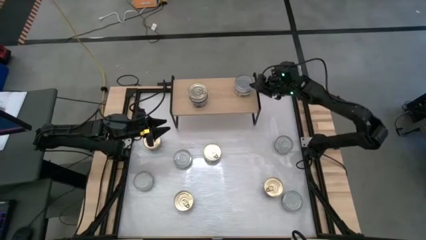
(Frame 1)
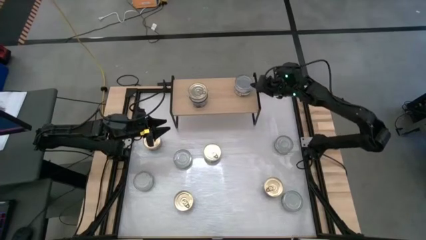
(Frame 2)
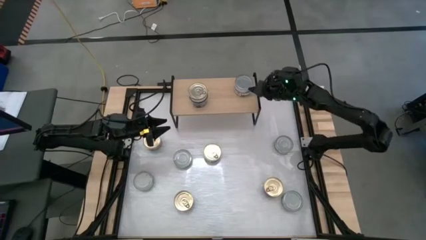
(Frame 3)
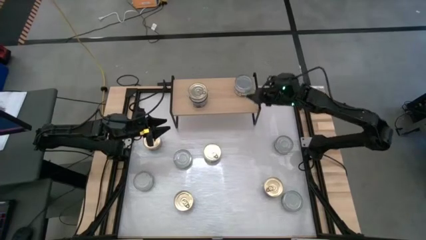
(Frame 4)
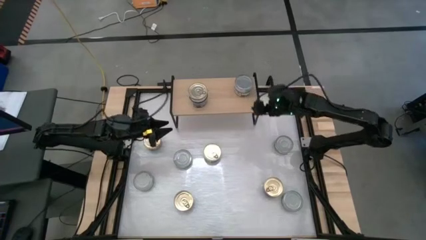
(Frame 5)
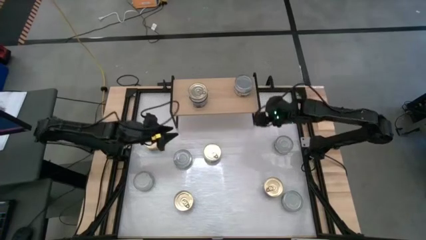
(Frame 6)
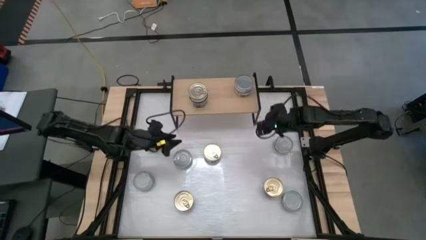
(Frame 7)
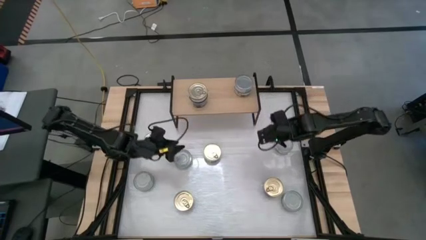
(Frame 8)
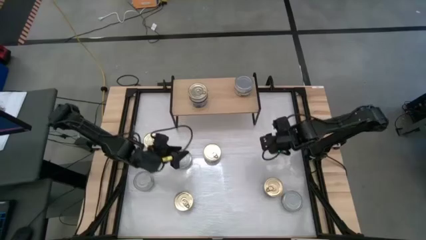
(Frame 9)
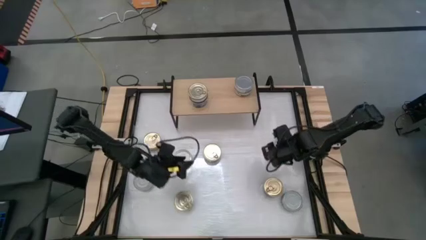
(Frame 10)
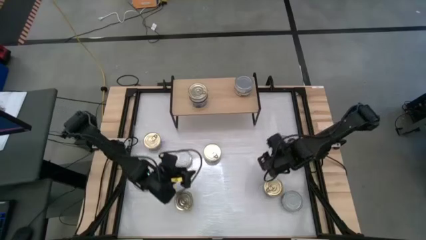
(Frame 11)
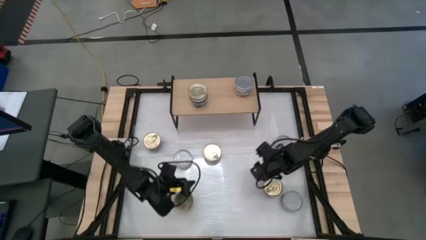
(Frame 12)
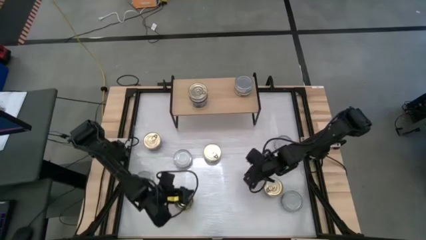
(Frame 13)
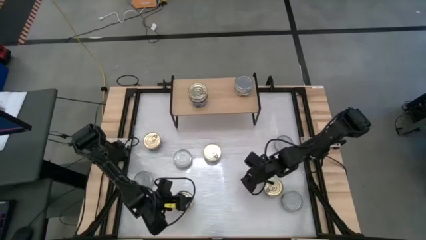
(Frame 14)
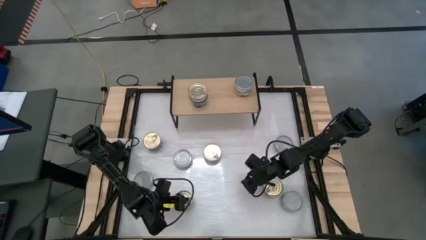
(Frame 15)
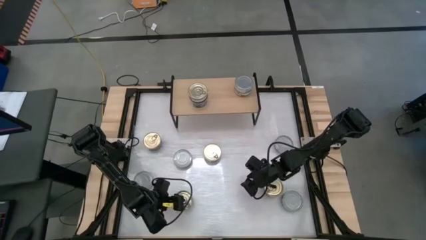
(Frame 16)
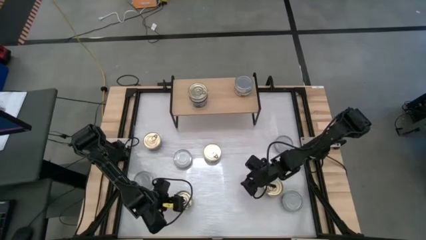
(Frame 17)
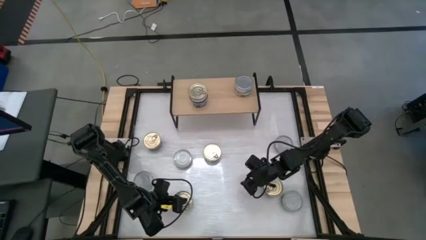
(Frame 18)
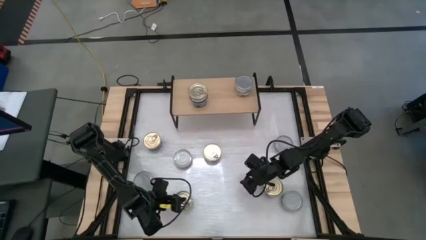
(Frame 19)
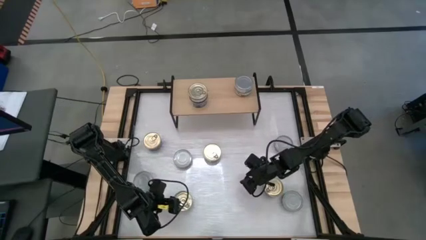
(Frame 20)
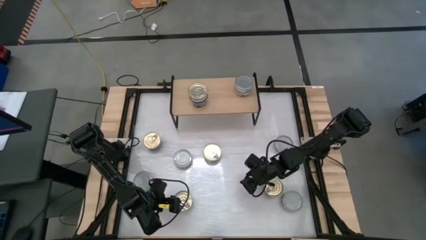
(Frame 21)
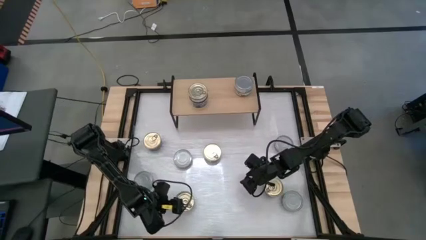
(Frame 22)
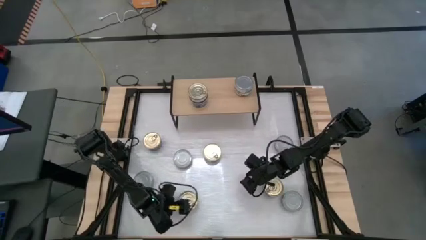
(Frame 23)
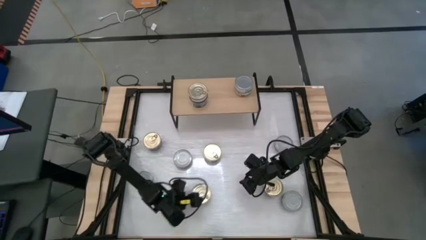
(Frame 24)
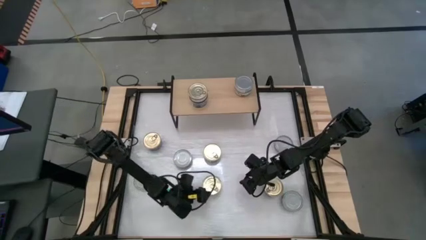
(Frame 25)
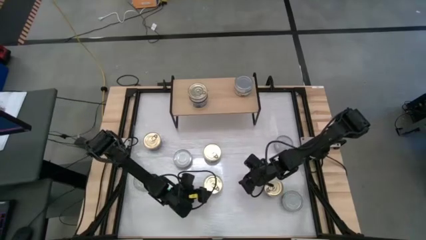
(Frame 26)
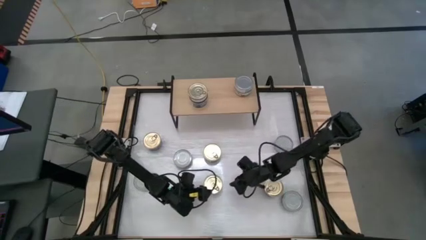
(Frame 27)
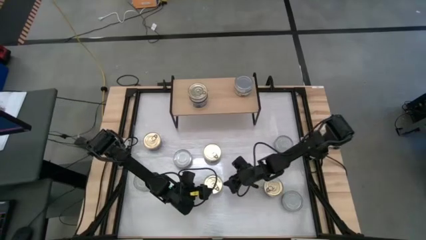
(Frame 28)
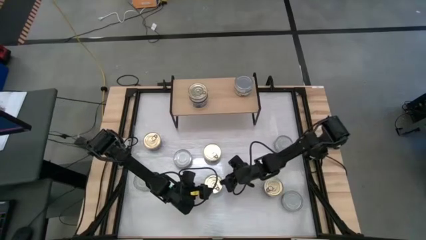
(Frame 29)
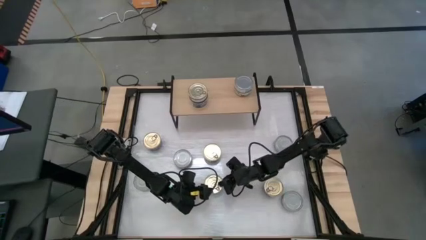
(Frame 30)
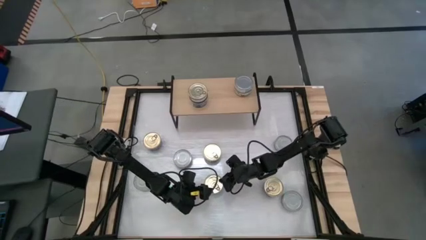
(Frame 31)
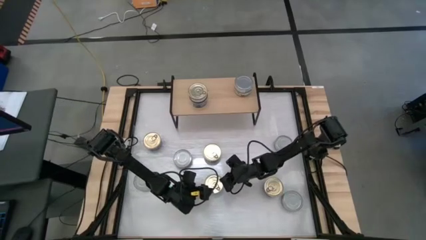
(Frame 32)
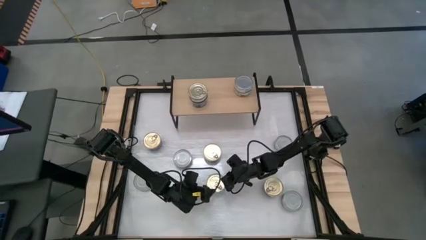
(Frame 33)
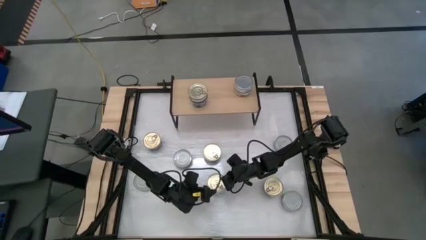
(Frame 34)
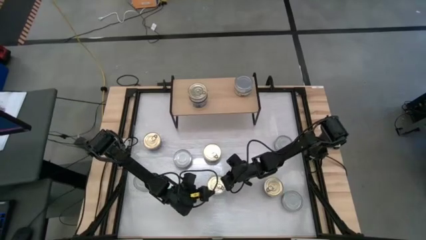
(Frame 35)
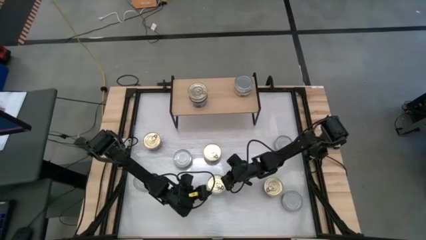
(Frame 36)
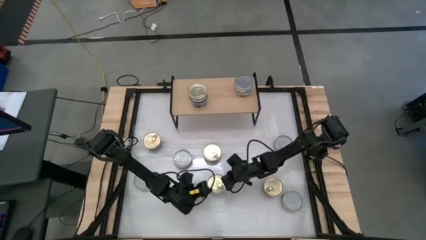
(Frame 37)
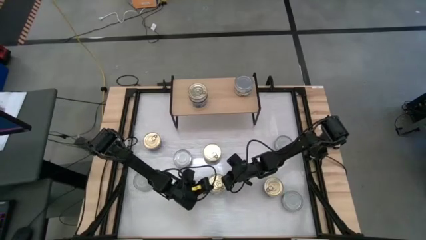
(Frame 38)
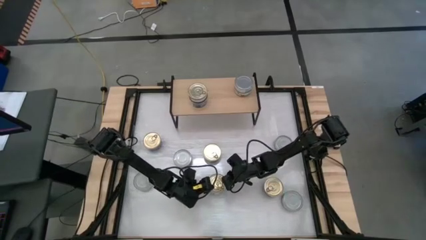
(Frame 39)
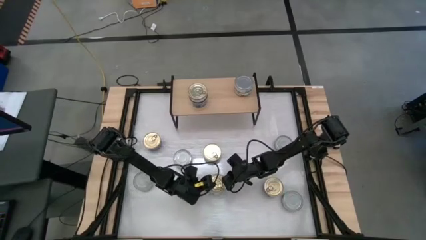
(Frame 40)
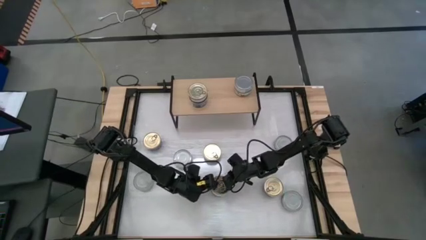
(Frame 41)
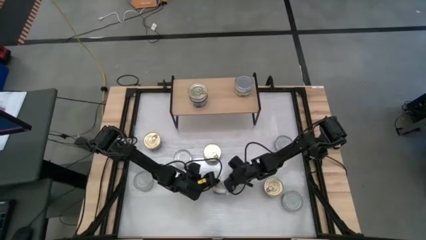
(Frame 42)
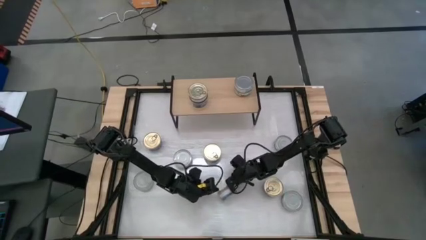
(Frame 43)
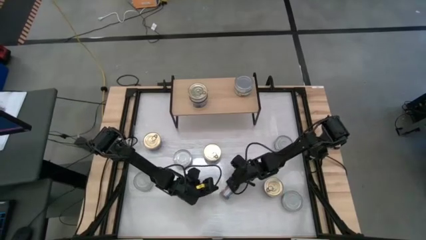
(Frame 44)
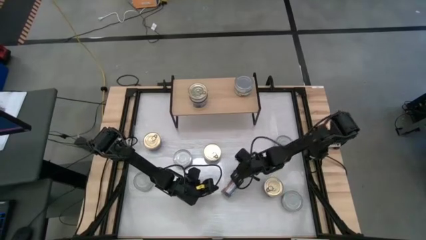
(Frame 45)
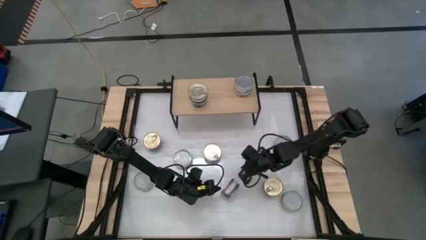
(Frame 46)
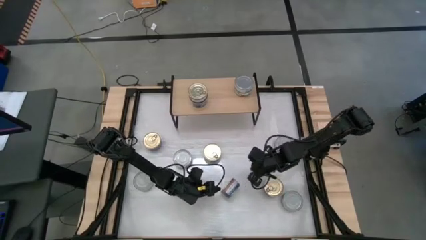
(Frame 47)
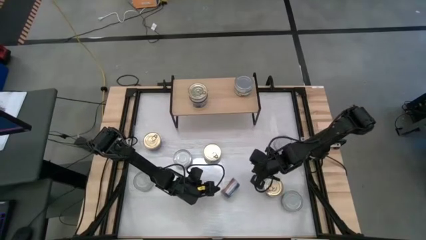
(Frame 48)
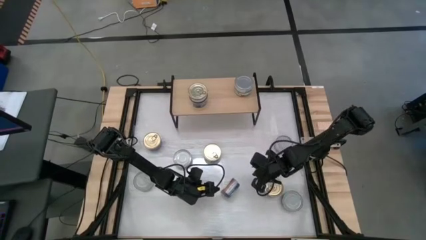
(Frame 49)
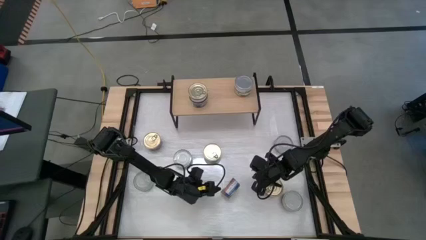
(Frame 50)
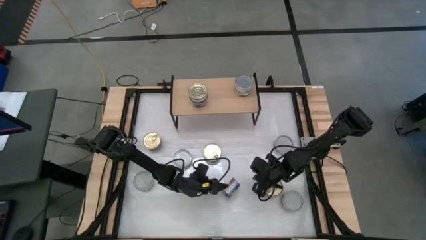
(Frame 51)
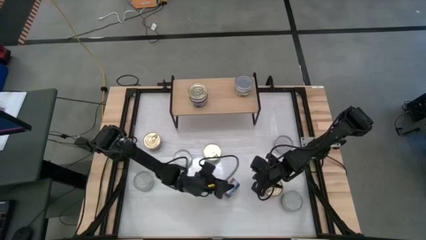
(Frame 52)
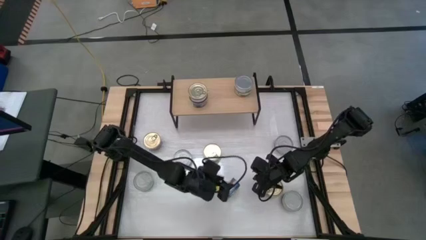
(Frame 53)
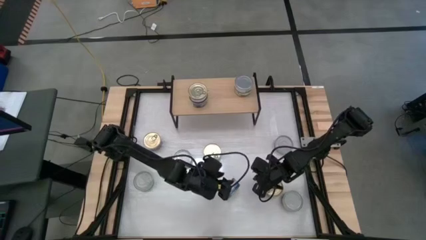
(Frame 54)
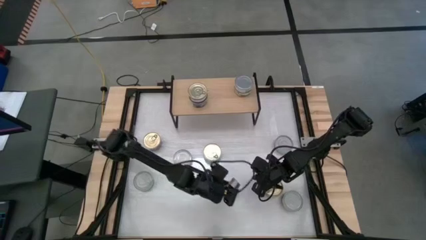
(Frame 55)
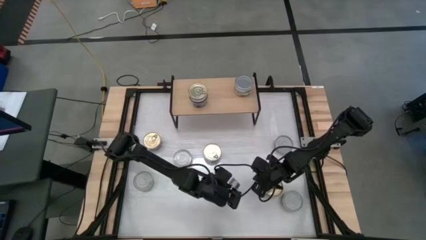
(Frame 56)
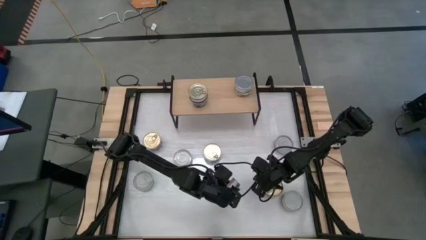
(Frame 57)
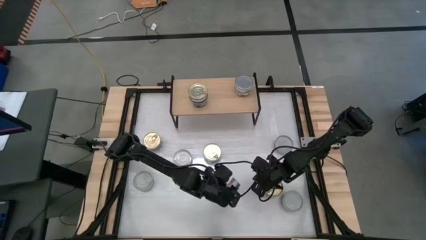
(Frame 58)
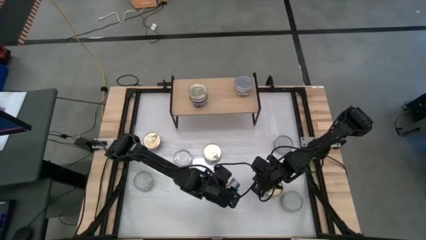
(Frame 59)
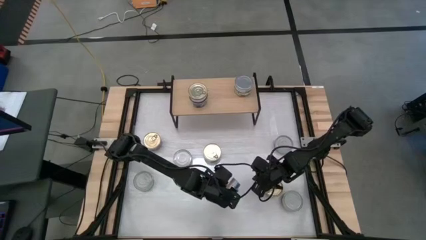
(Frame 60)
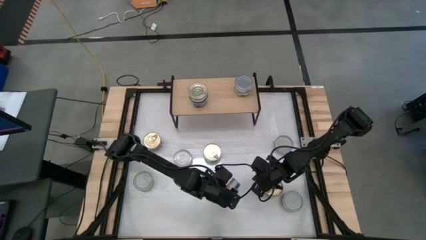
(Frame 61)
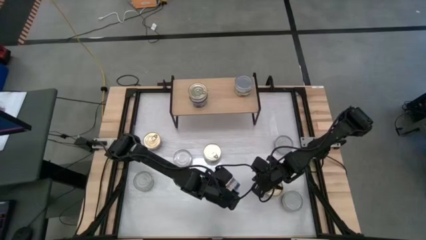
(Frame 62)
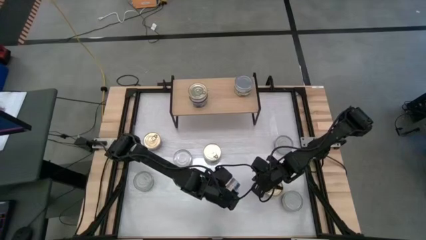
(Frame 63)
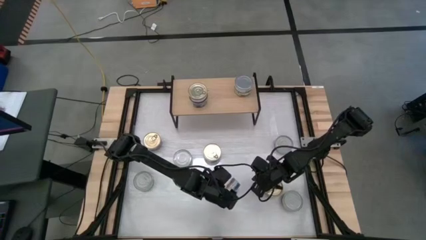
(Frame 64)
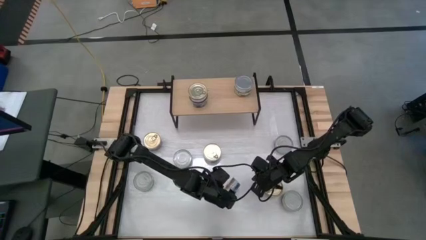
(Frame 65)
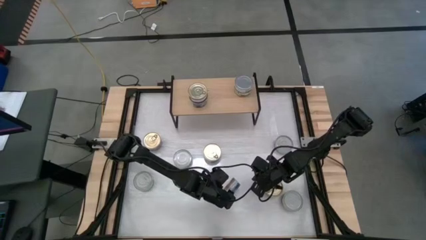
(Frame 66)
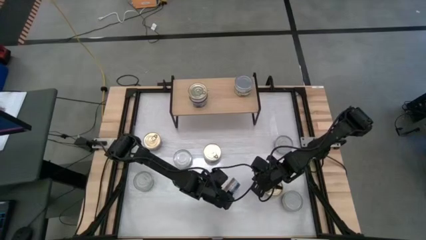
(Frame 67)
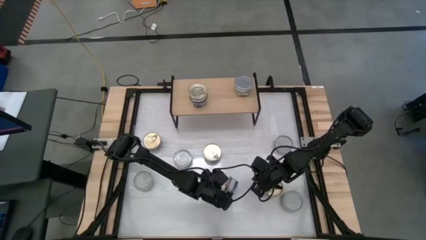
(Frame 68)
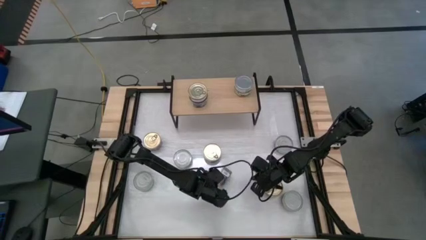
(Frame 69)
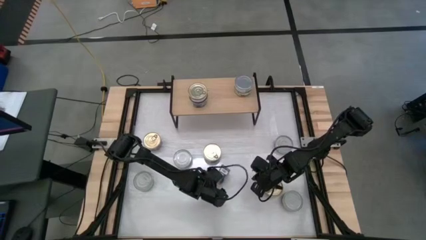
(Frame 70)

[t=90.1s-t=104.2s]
Task: Stack canned seafood by type on shelf
Put the blue and pink tuna can on the shelf
